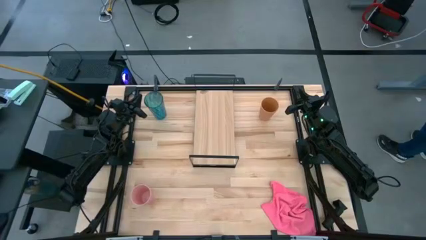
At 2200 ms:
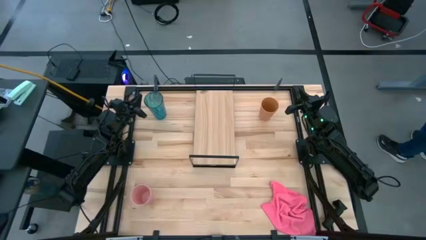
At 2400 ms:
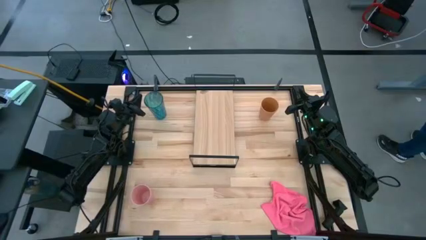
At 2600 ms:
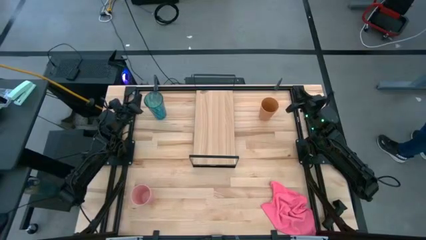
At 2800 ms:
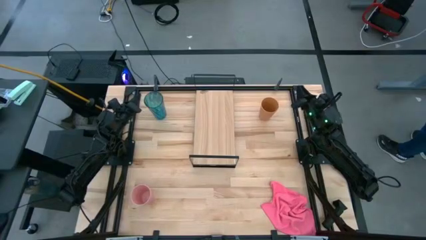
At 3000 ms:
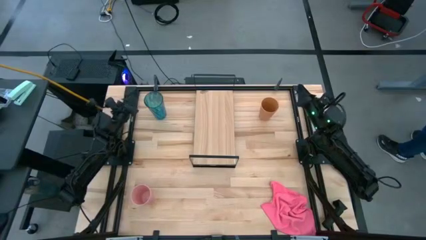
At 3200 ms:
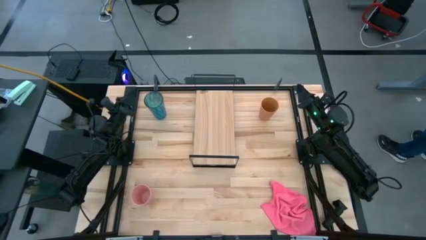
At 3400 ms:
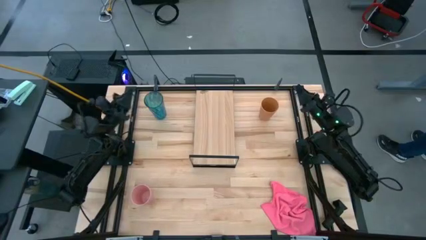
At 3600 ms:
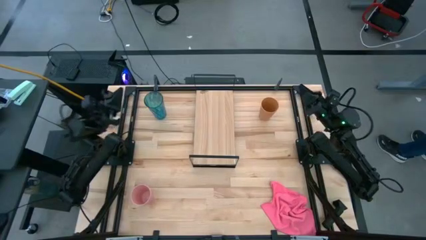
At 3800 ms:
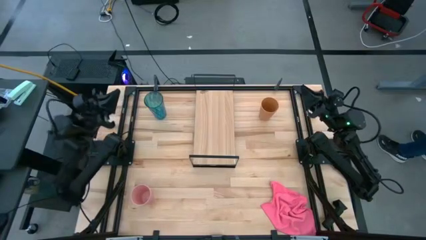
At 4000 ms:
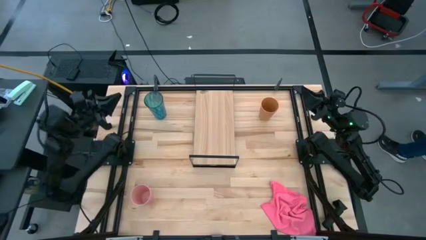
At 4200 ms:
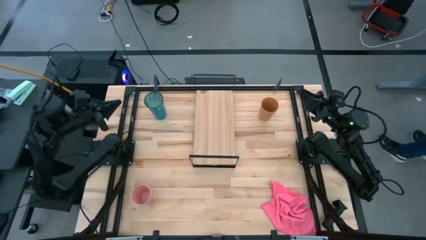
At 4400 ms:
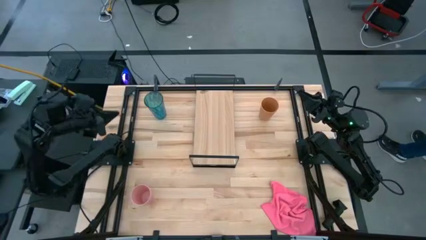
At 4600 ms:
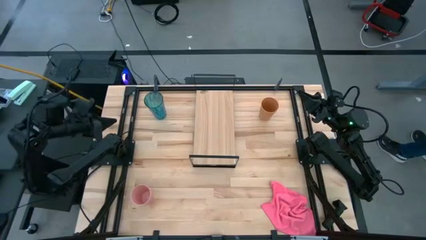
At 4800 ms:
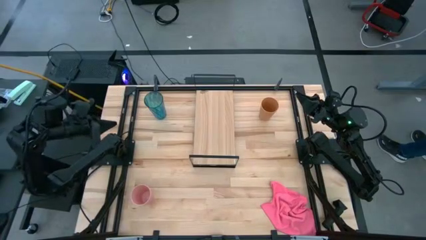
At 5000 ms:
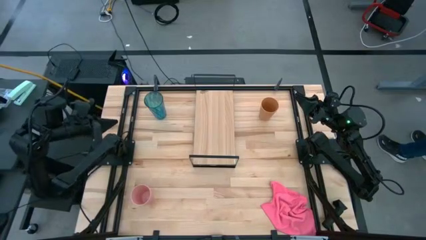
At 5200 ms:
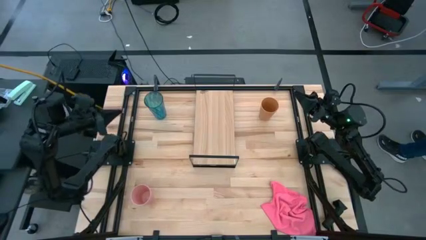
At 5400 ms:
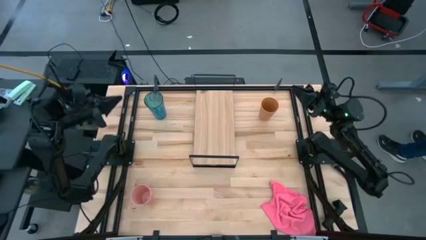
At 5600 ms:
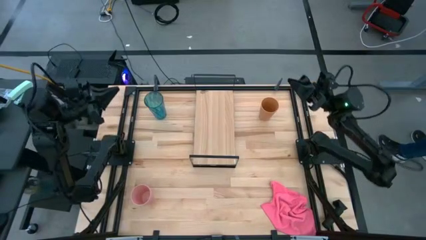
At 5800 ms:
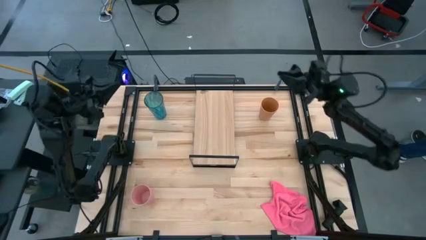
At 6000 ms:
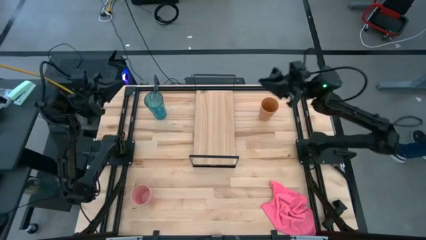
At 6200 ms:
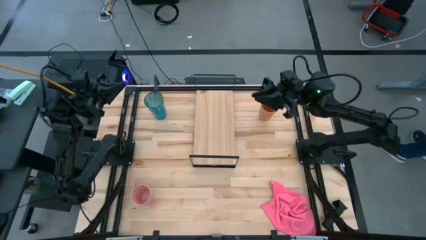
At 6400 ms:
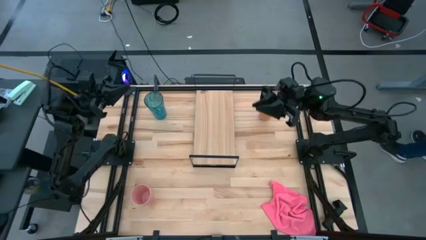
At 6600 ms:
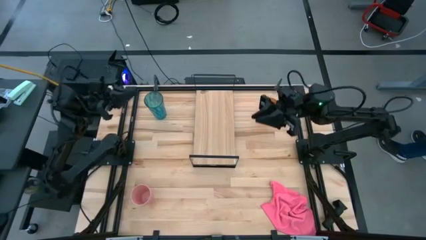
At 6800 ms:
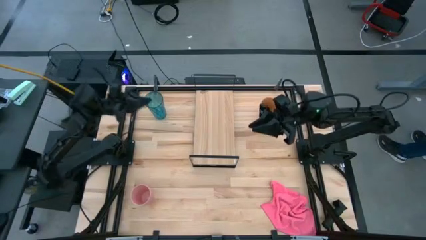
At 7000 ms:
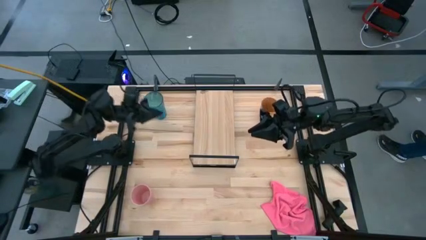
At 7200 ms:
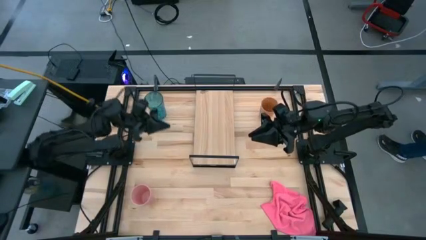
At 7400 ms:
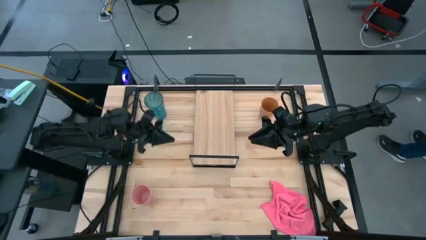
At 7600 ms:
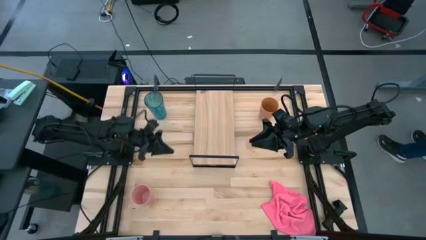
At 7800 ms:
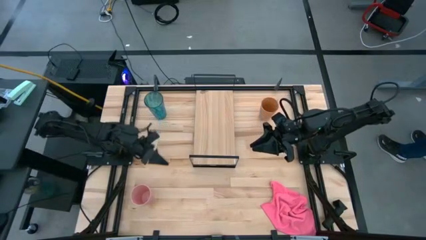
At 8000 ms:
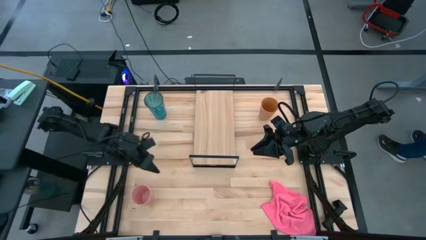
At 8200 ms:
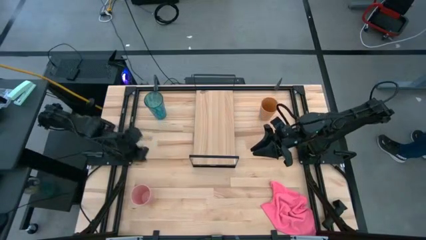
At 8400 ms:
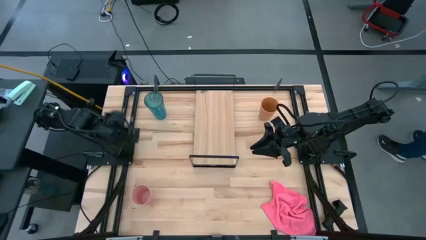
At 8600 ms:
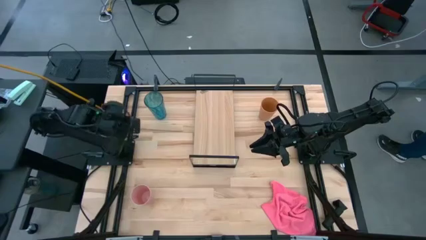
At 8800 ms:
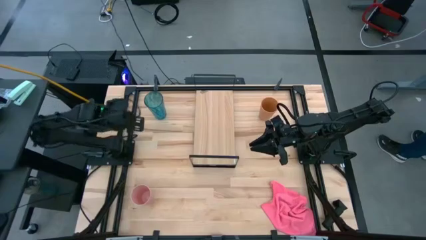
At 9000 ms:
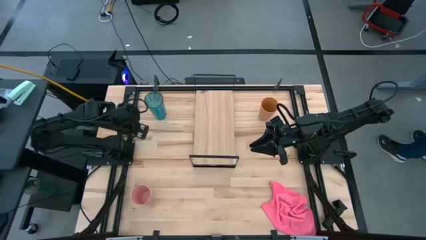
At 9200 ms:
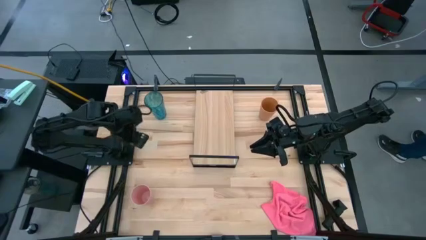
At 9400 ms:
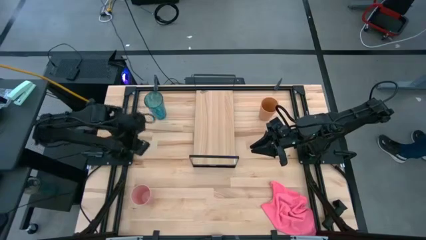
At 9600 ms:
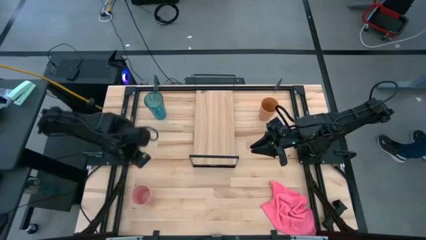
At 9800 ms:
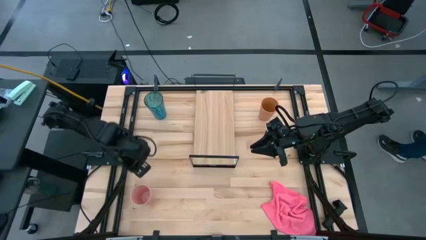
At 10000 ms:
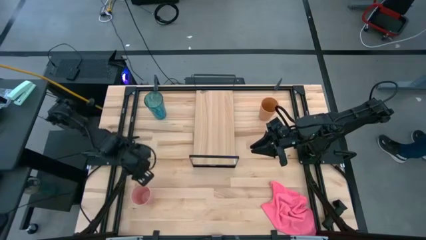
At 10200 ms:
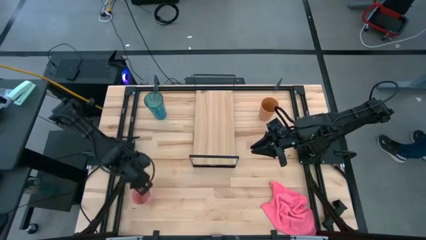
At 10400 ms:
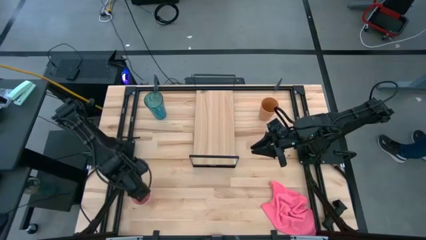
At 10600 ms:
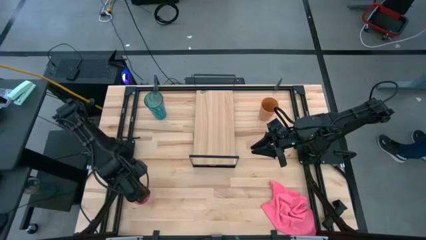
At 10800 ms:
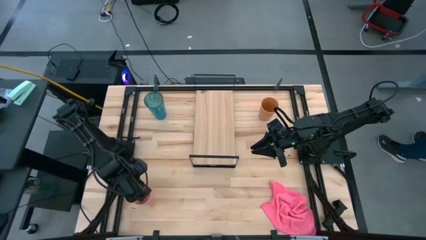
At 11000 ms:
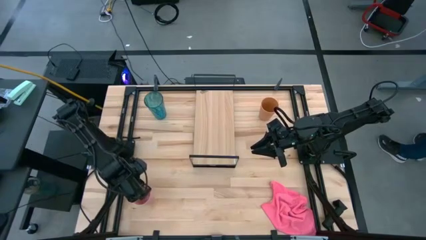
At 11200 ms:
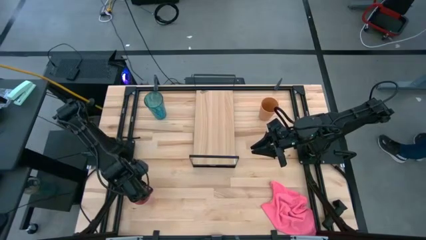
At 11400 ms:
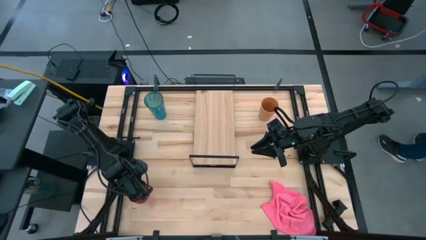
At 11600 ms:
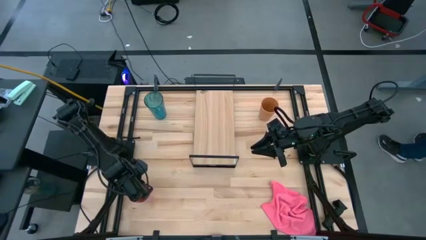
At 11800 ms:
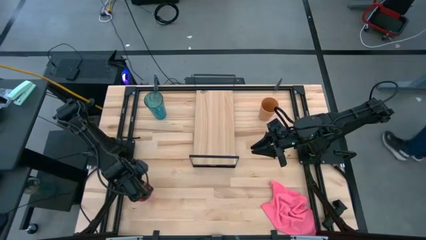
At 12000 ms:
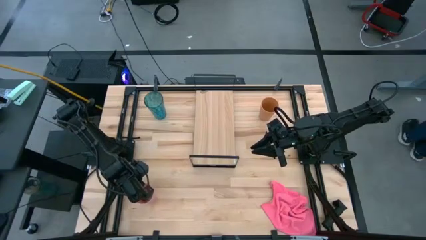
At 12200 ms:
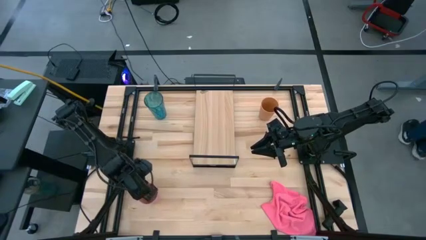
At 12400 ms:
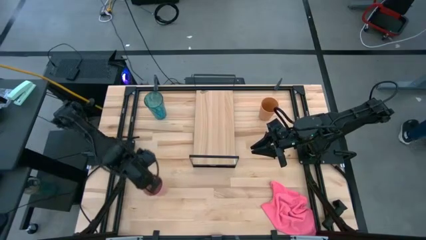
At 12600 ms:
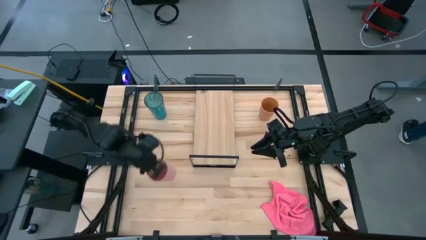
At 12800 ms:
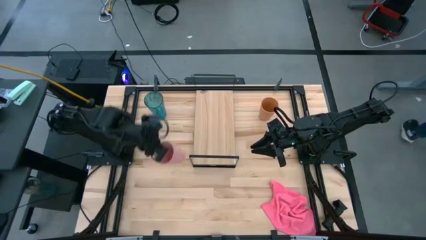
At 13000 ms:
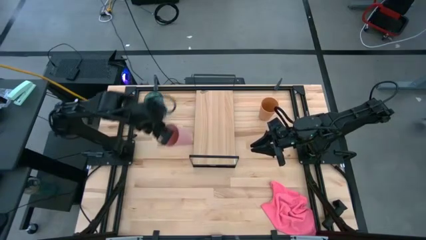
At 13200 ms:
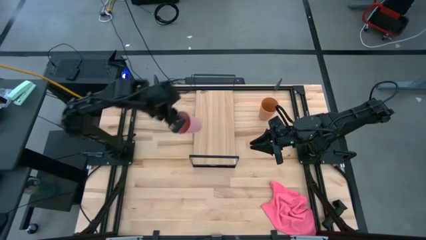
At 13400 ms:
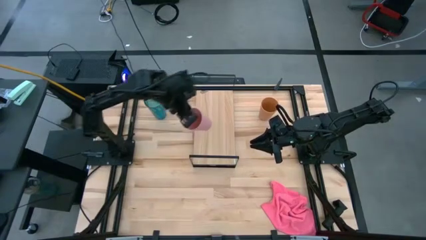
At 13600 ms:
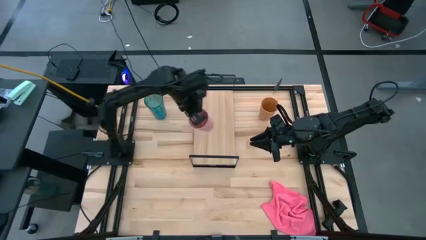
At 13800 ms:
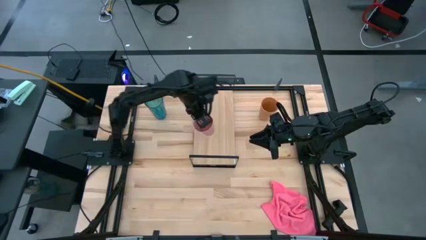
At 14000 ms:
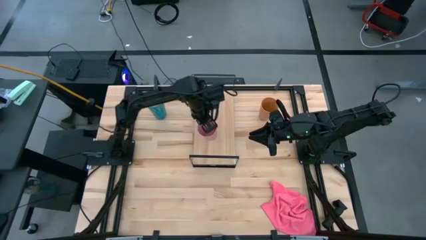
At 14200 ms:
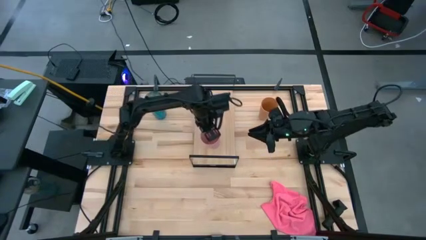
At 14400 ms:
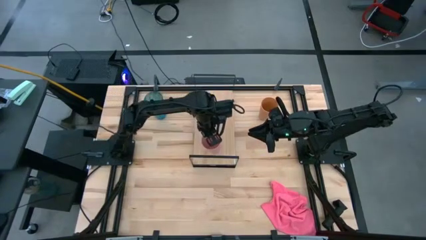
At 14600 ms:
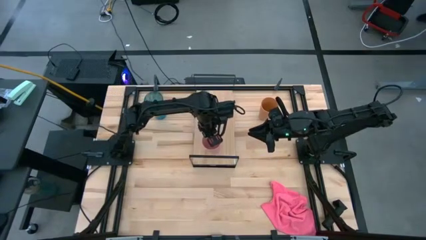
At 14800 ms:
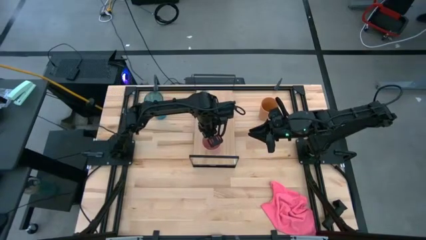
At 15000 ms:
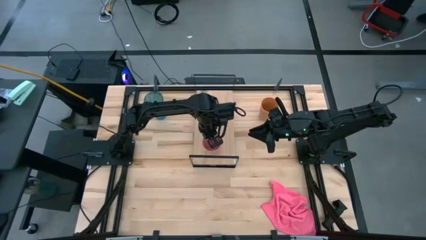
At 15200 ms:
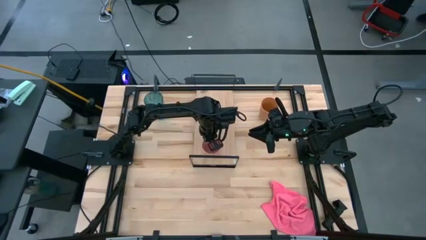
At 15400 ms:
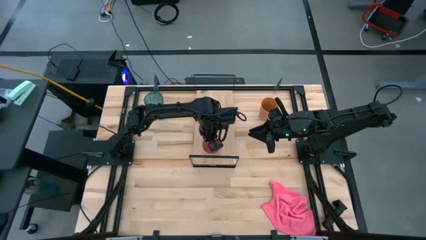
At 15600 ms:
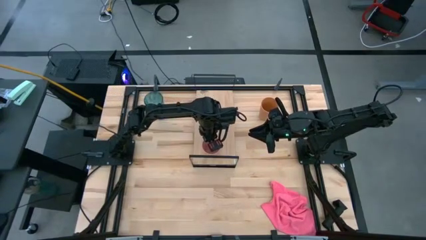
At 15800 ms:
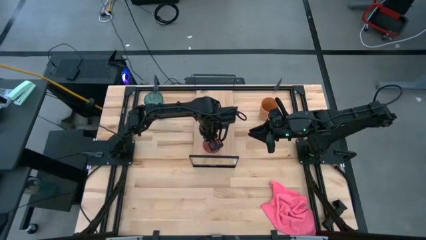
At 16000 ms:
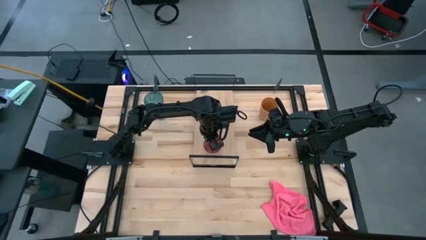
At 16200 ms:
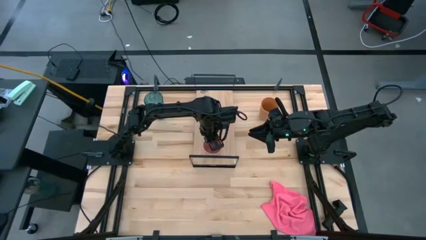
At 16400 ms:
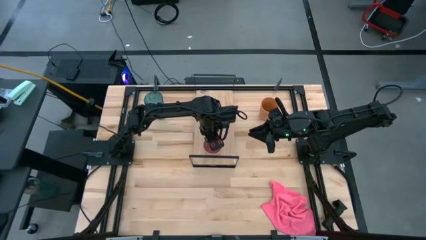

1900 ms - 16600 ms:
Task: Stack small to large cups/mugs on shelf
Put the pink cup on the shelf
